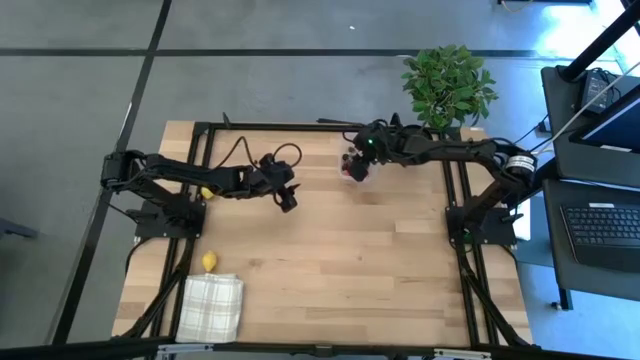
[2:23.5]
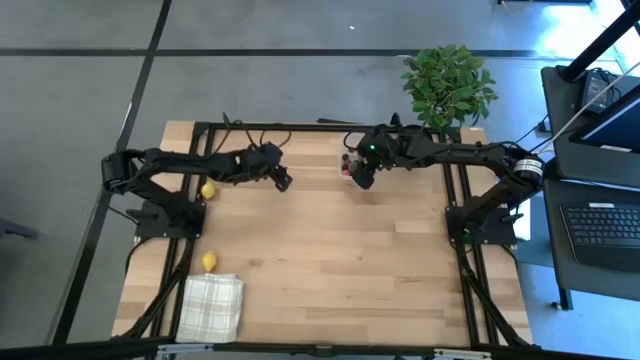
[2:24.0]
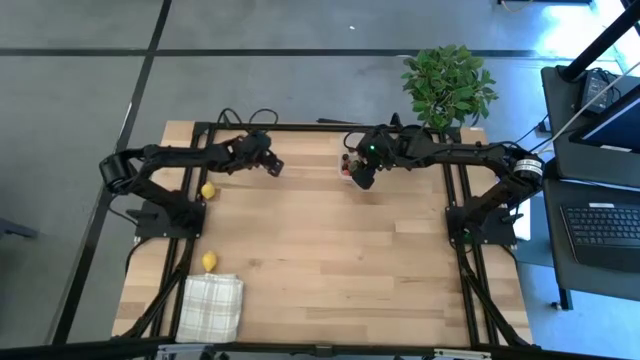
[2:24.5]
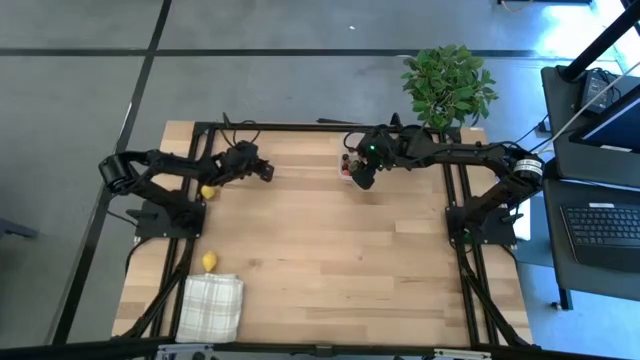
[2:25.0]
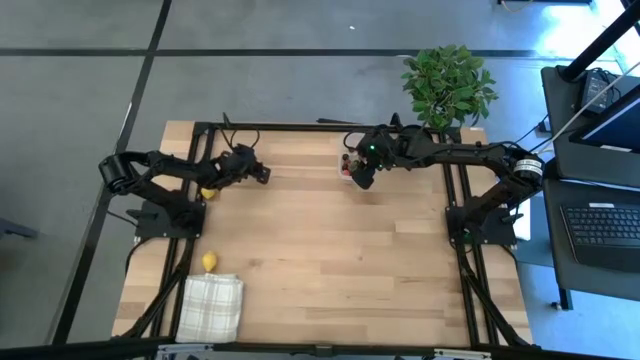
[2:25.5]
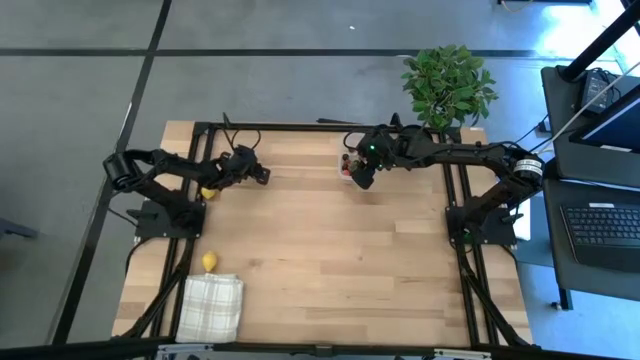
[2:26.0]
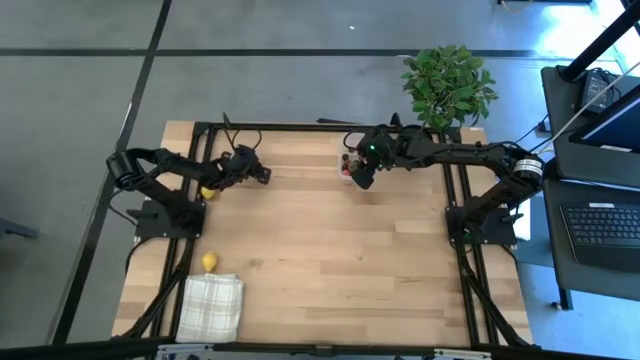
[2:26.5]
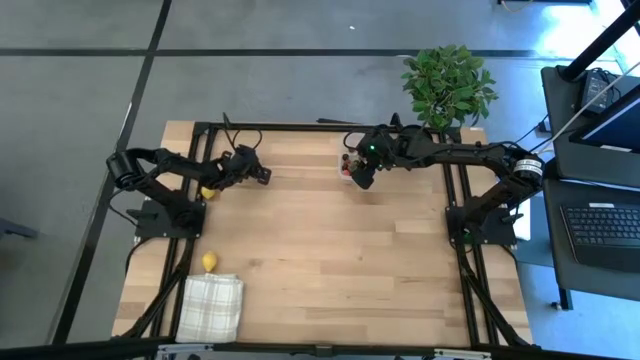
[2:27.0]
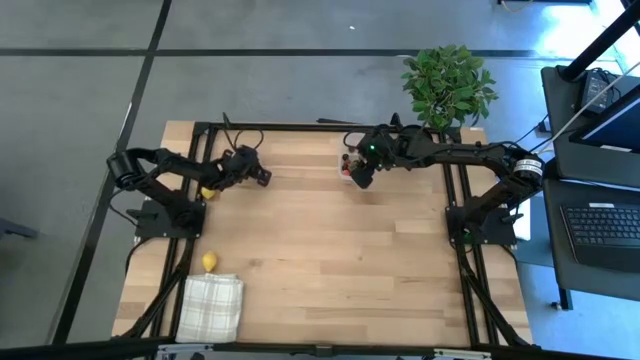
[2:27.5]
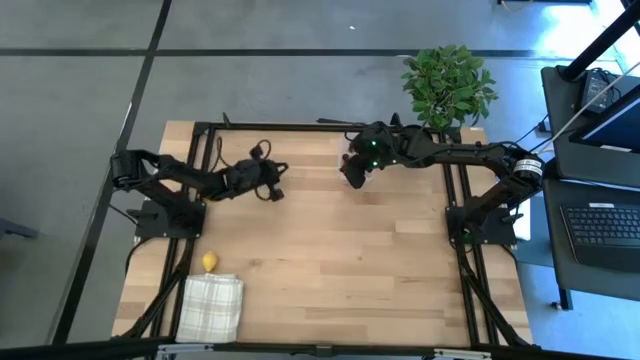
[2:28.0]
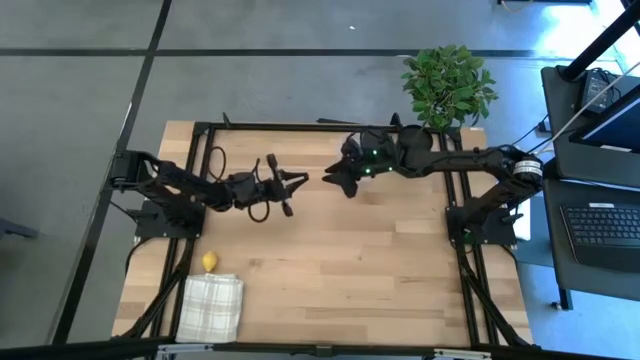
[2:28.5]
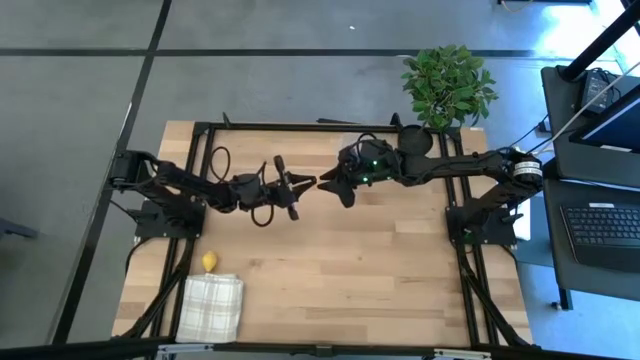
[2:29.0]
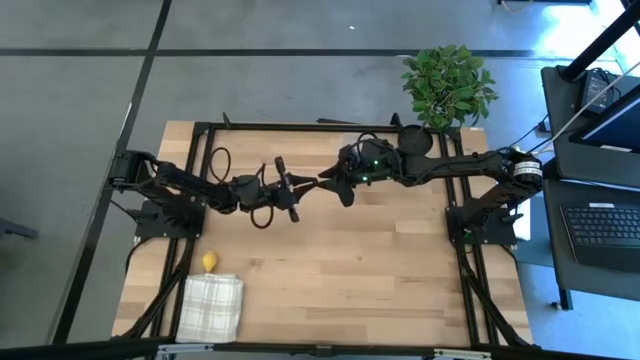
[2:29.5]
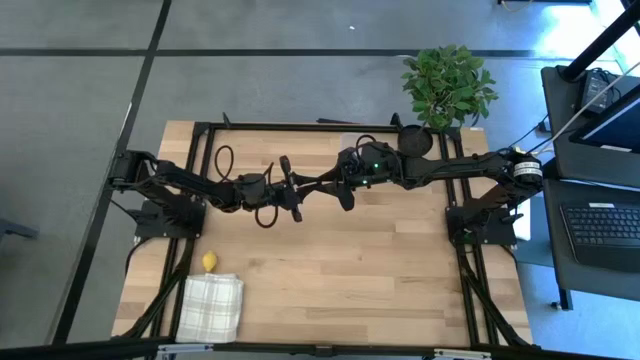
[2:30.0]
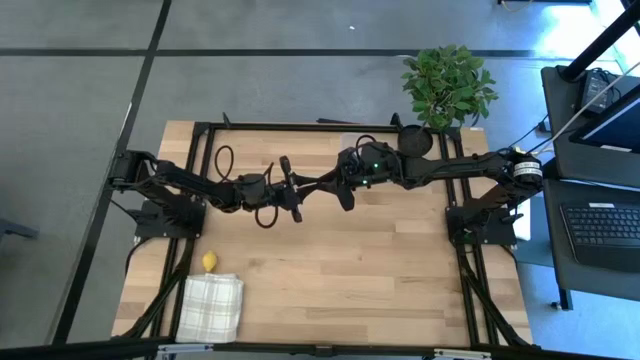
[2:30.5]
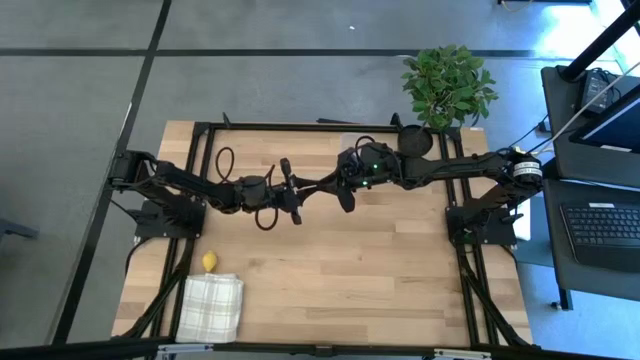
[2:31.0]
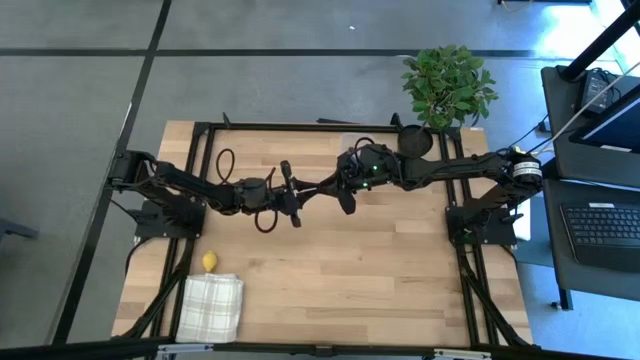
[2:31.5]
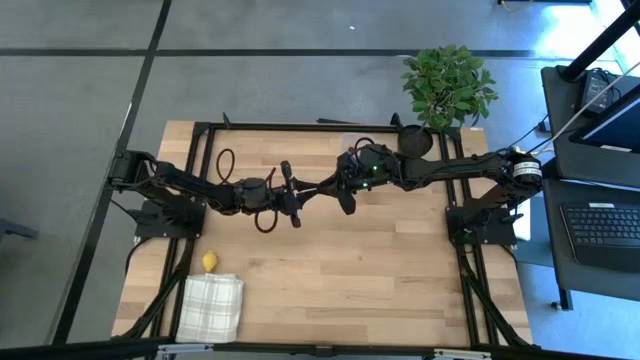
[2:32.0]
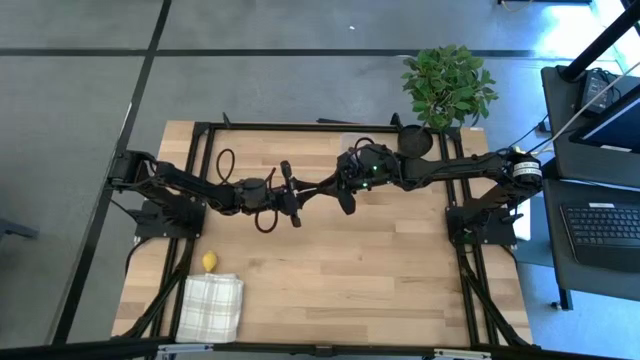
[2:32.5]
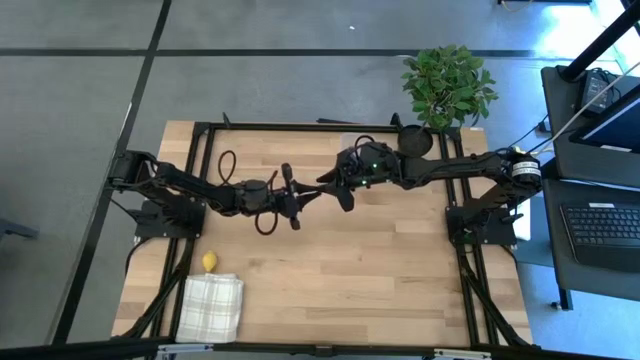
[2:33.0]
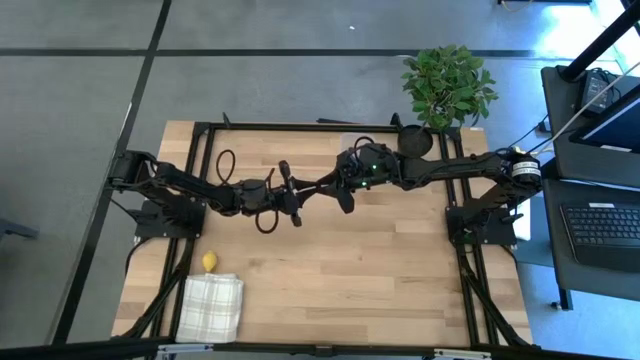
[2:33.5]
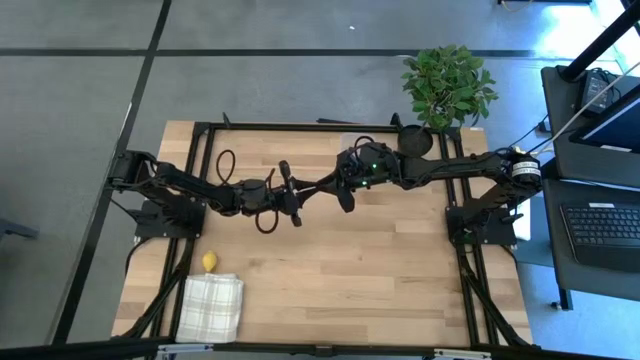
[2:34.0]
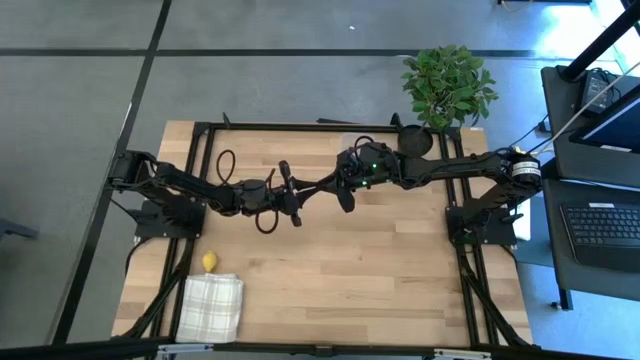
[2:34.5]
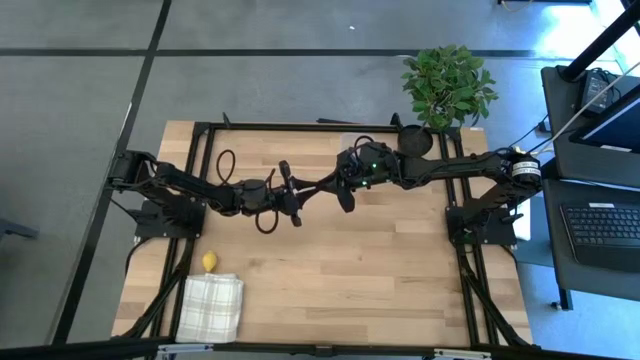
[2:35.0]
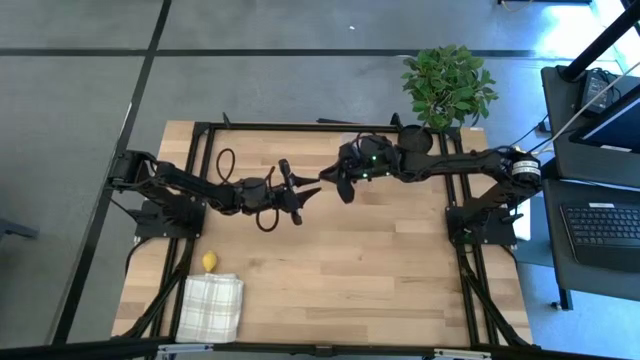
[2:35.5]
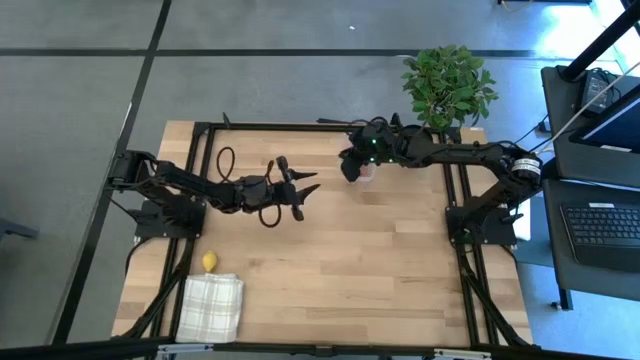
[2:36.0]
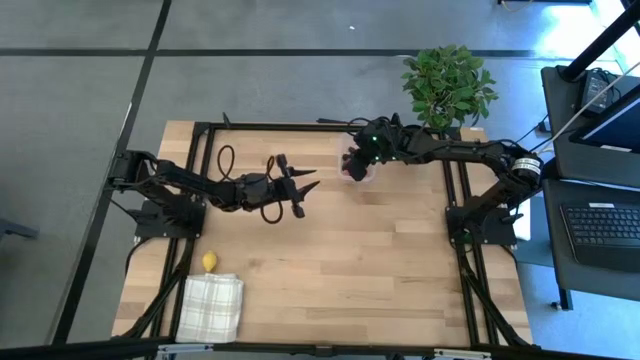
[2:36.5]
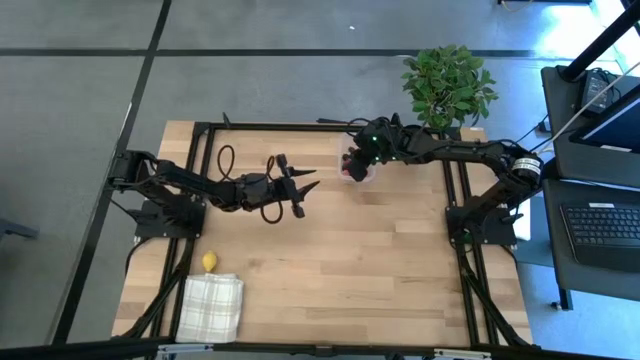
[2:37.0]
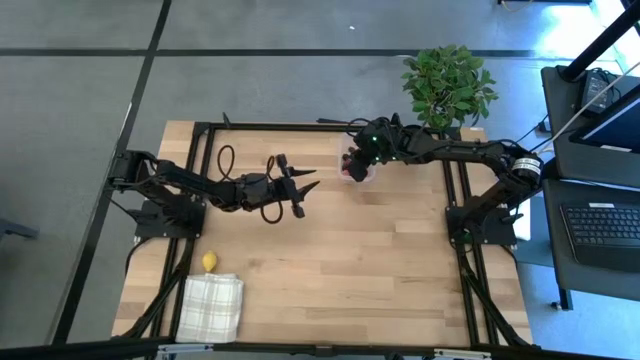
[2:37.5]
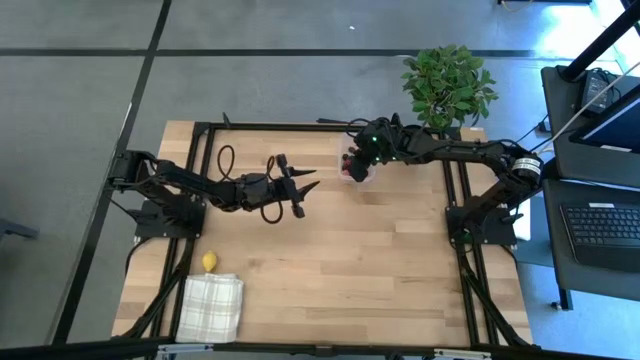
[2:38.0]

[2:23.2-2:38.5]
Task: Pick and placing Produce into tupperware
Put the blueberry into the transparent bin

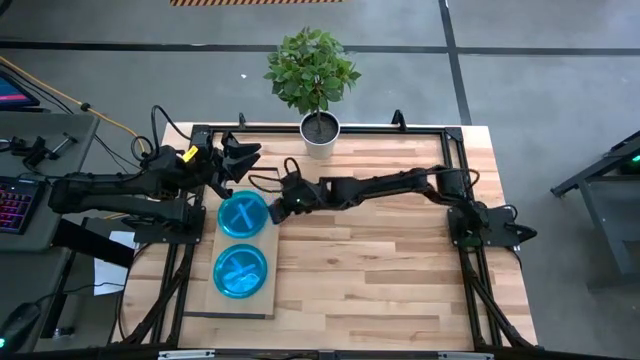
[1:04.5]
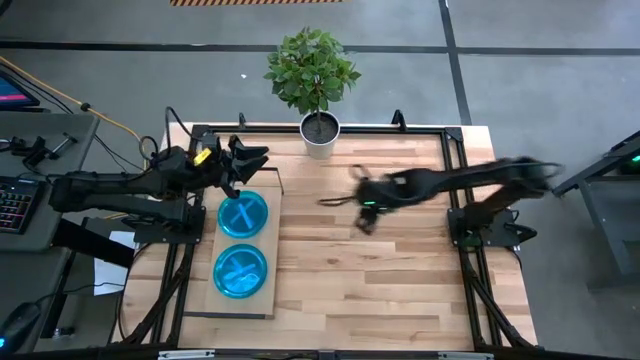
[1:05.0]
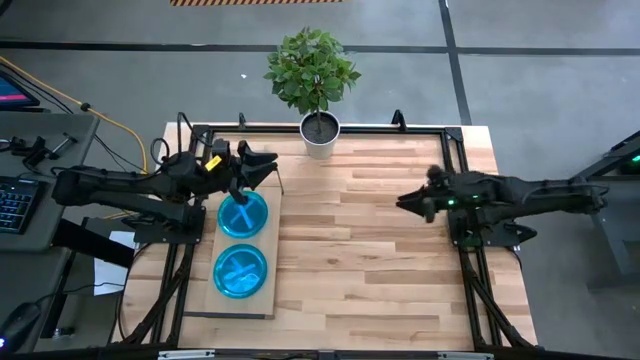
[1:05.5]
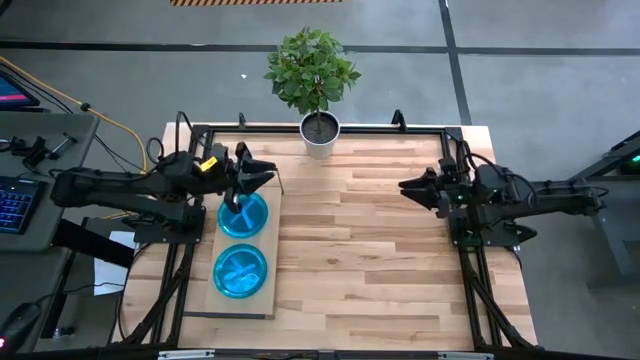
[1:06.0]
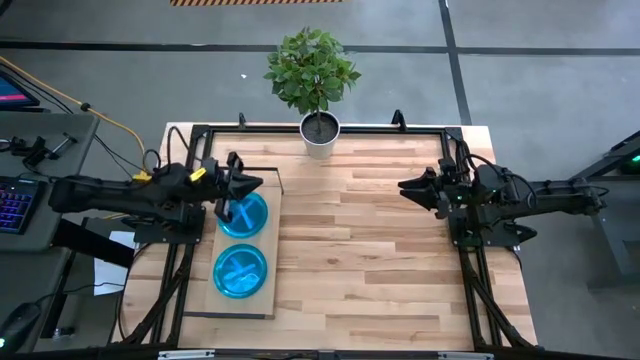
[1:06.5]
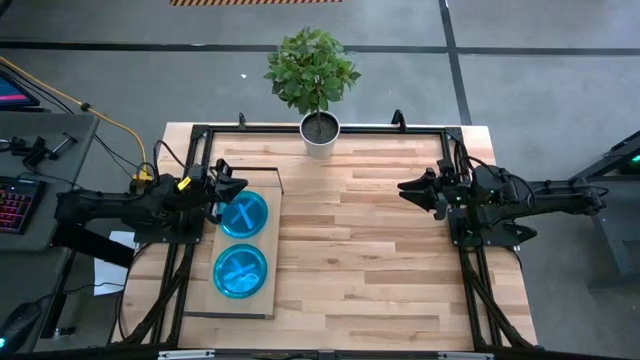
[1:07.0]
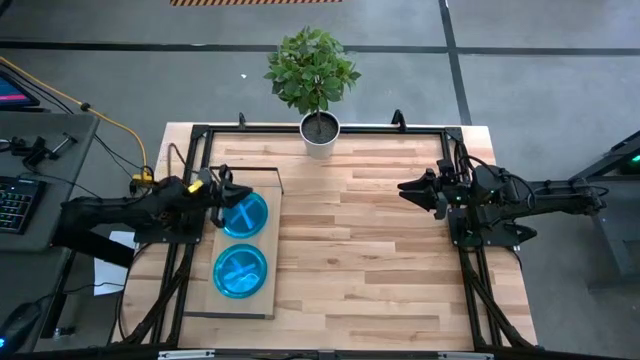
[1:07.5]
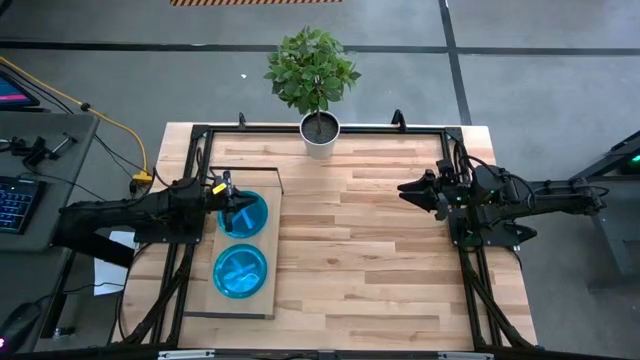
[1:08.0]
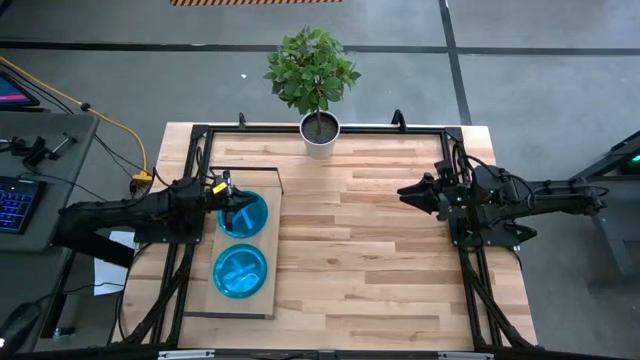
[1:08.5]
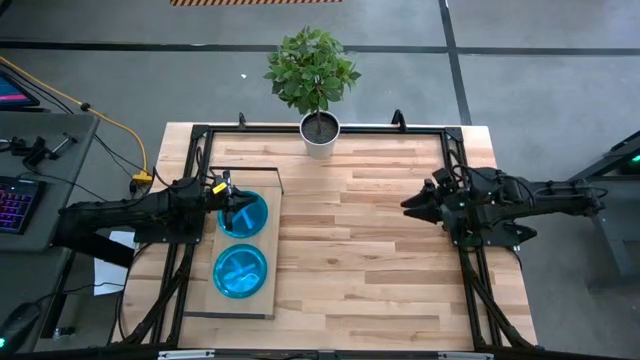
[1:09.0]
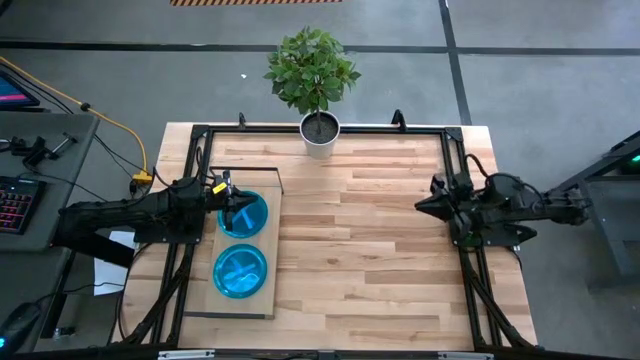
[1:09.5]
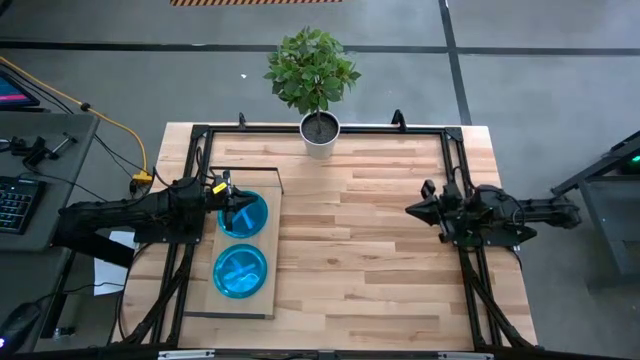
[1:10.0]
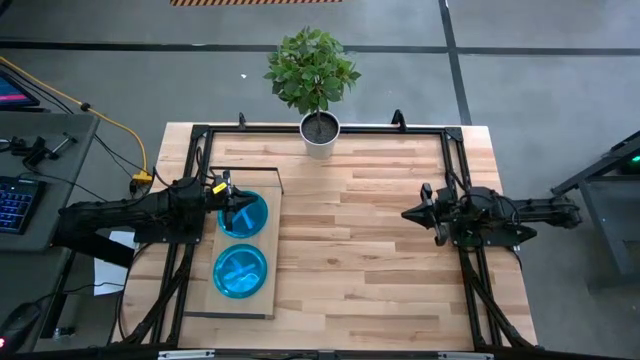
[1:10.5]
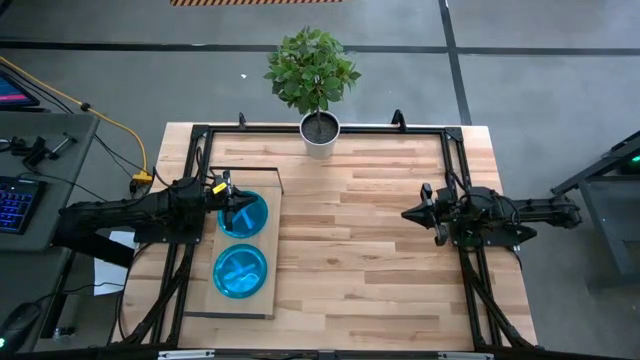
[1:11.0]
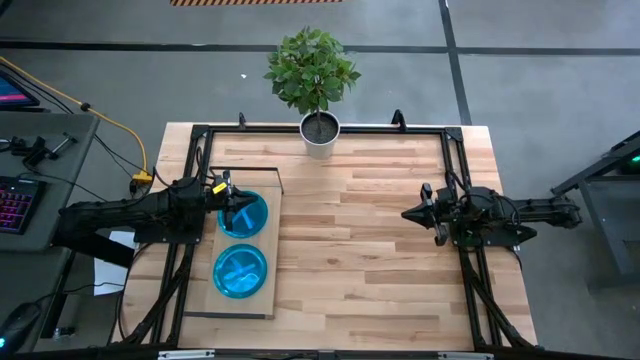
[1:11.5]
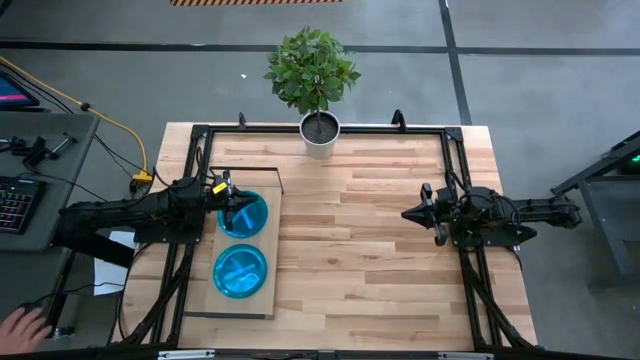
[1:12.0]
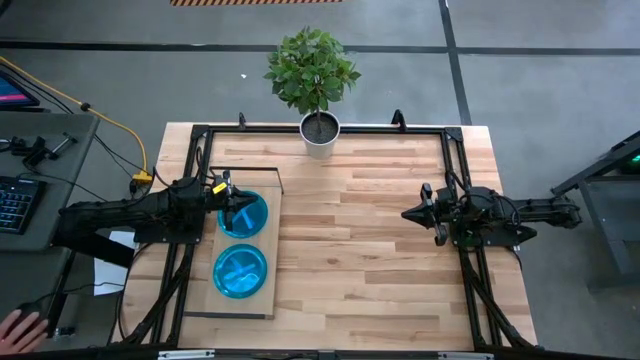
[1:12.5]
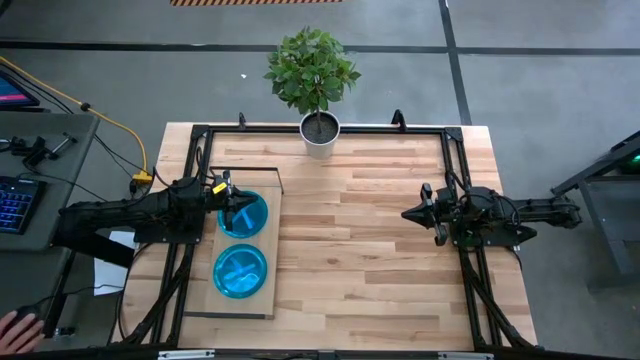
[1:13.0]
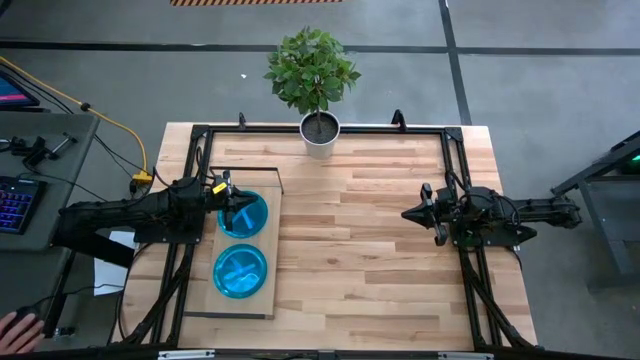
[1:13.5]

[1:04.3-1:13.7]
Task: Place and stack plates onto a shelf
Return to Home Position
